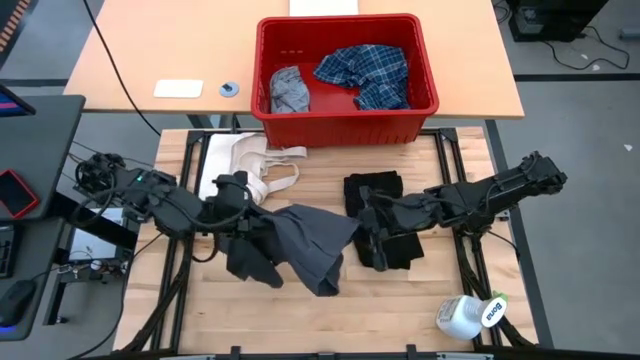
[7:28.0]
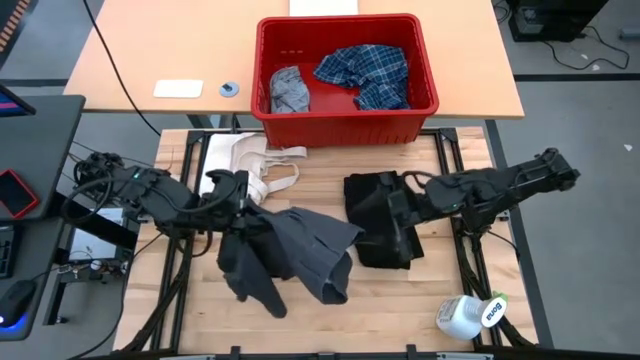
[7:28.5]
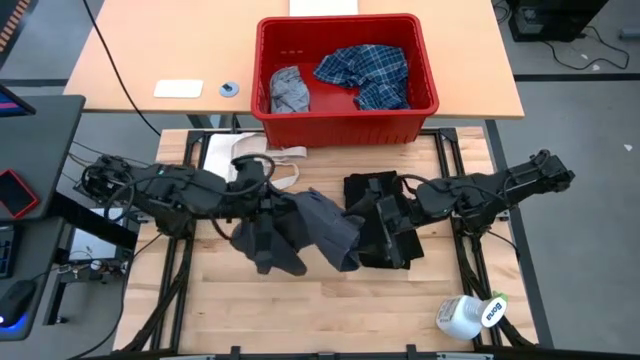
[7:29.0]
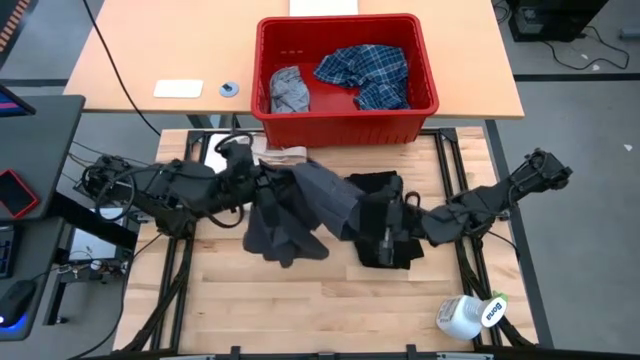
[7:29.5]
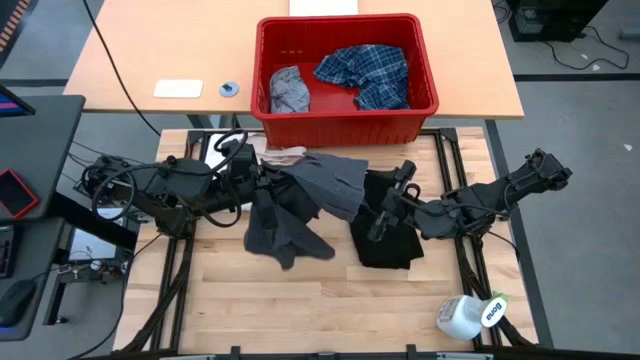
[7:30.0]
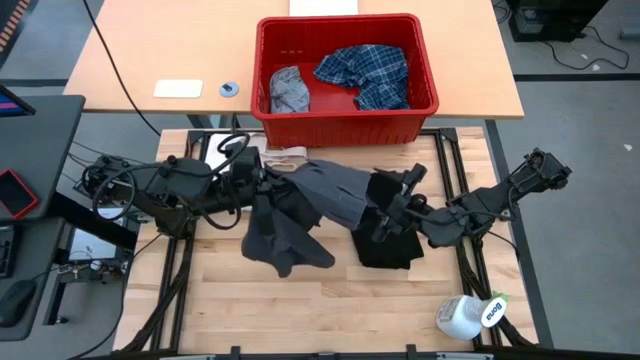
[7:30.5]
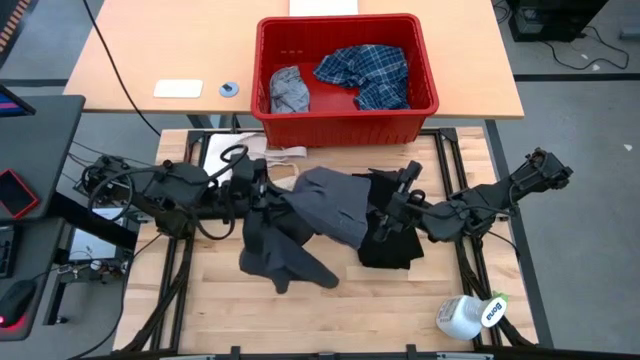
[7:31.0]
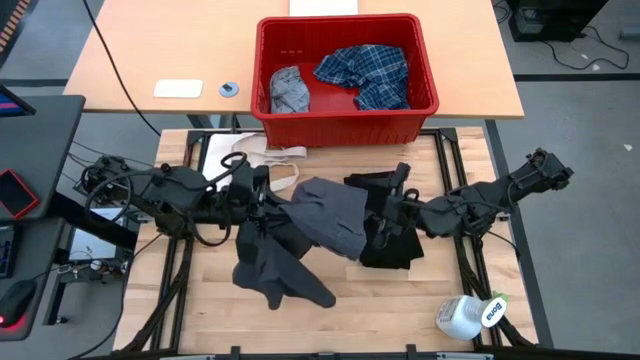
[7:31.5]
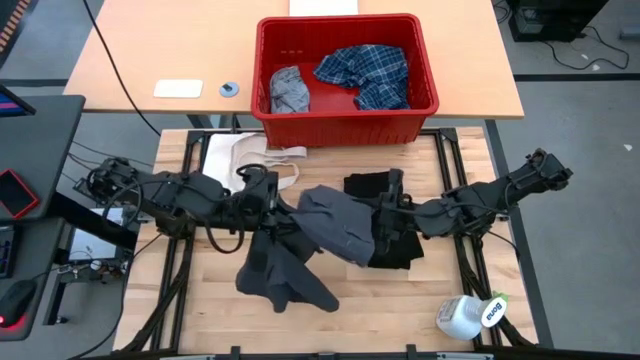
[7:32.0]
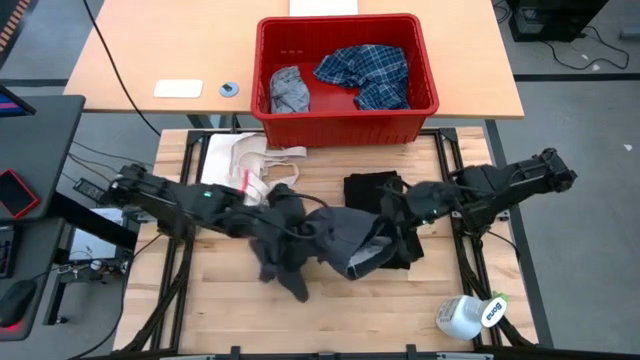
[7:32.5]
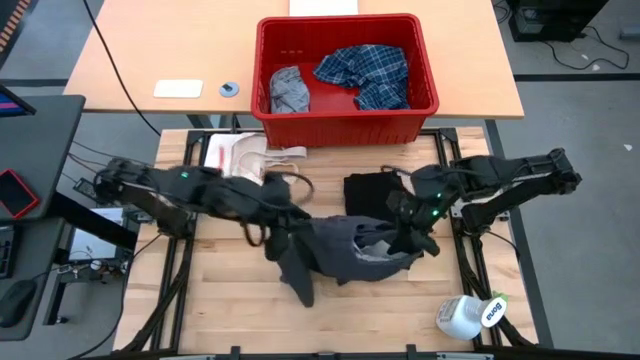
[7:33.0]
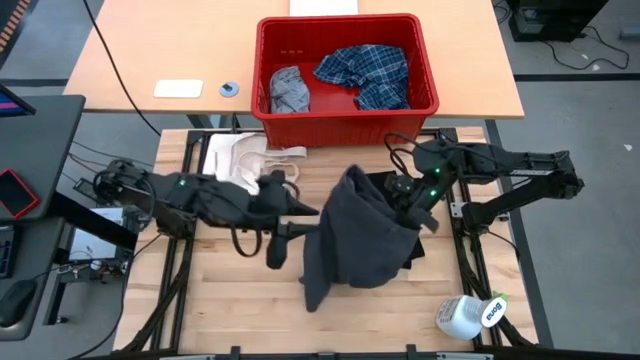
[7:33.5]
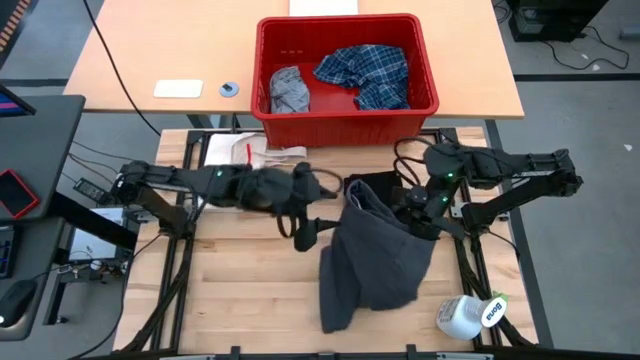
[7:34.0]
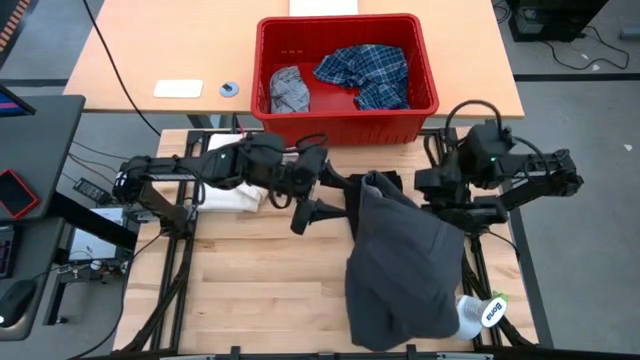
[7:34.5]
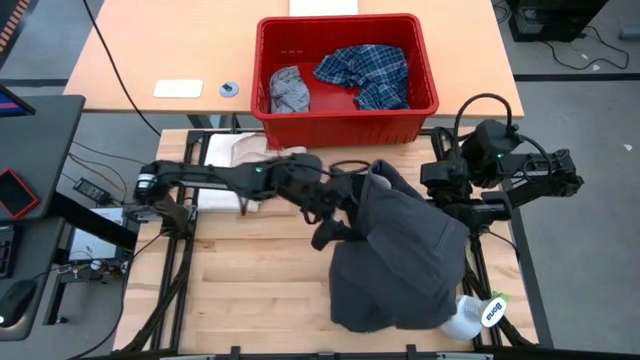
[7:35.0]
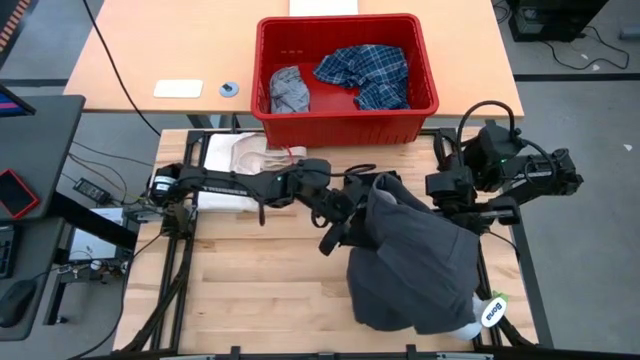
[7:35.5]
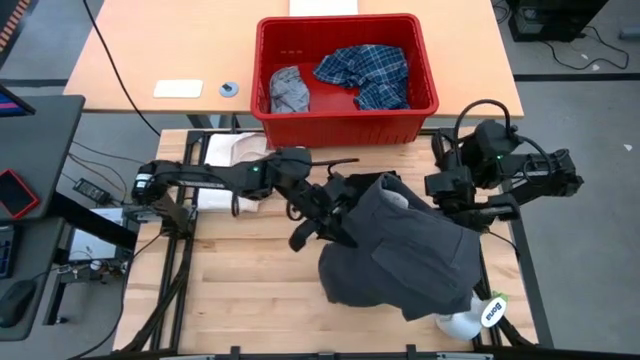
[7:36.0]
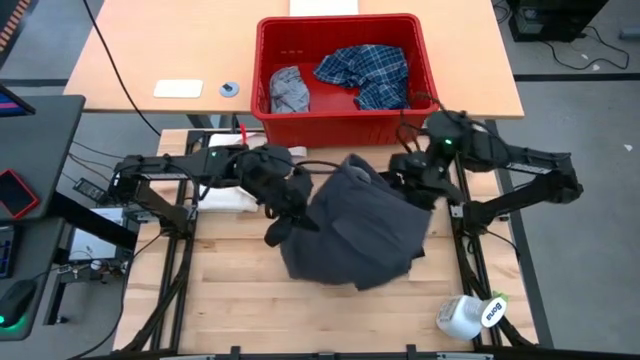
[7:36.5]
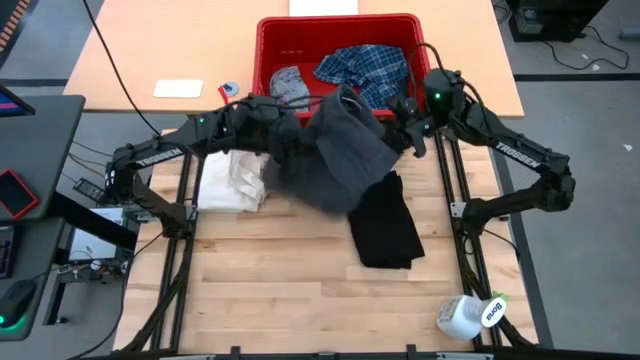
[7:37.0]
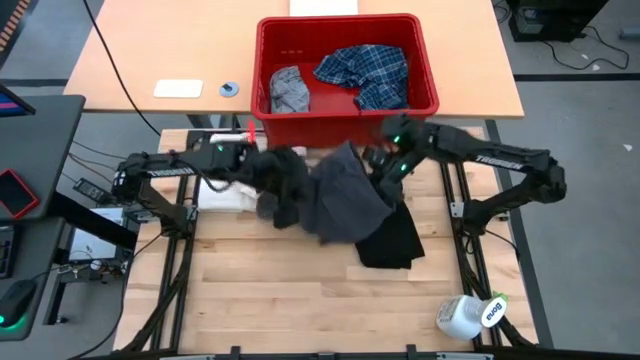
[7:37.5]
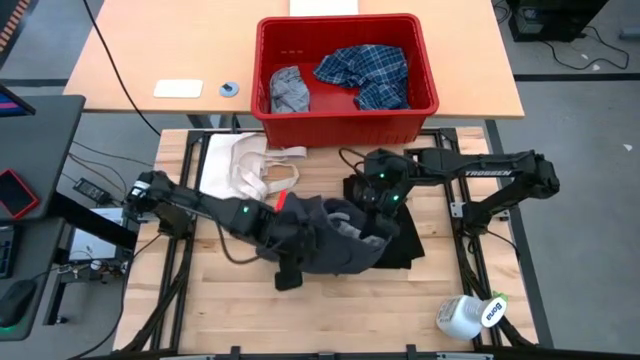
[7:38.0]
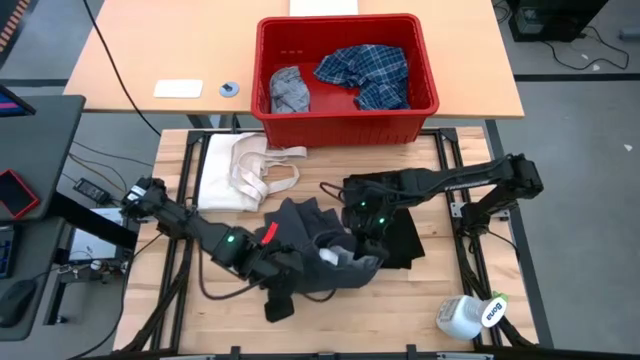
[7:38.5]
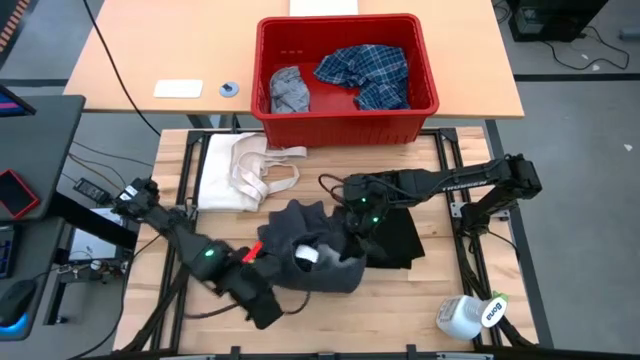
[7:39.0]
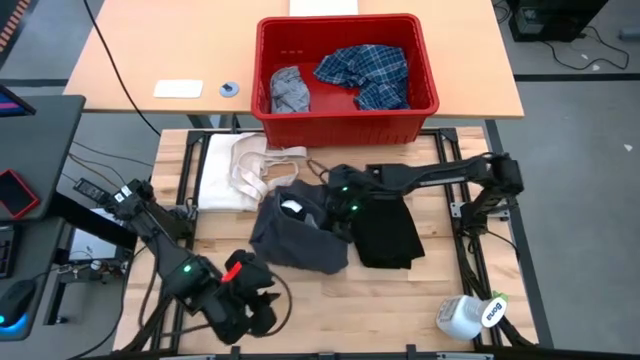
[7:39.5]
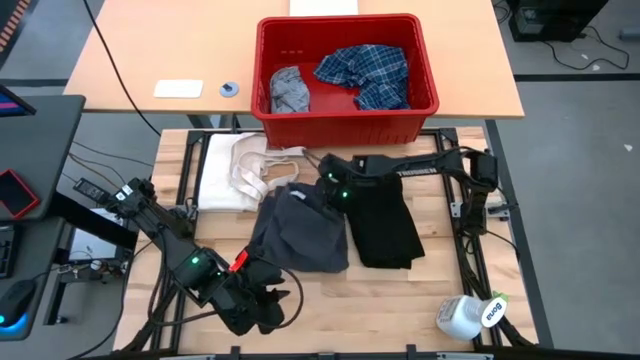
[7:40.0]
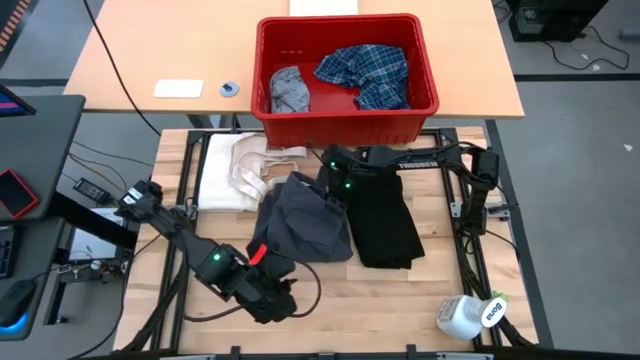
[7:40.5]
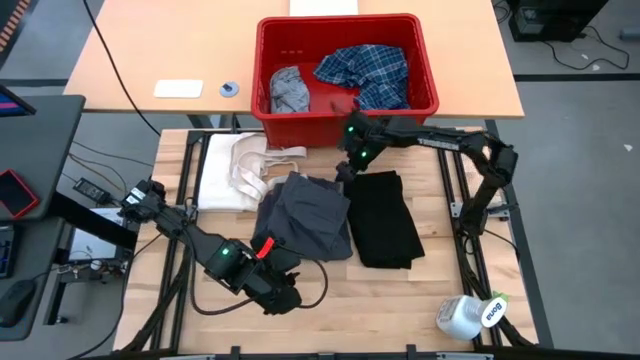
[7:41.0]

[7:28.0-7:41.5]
Task: Fold Laundry from Bin
Fold the gray pants

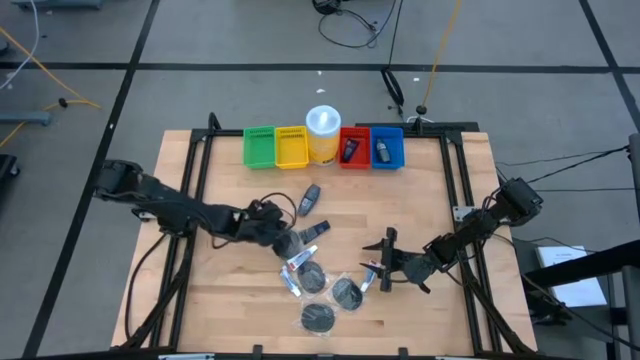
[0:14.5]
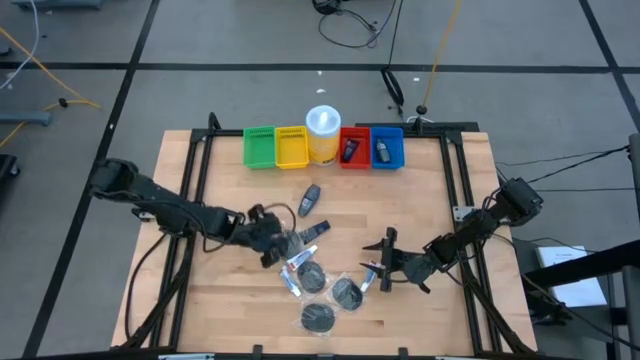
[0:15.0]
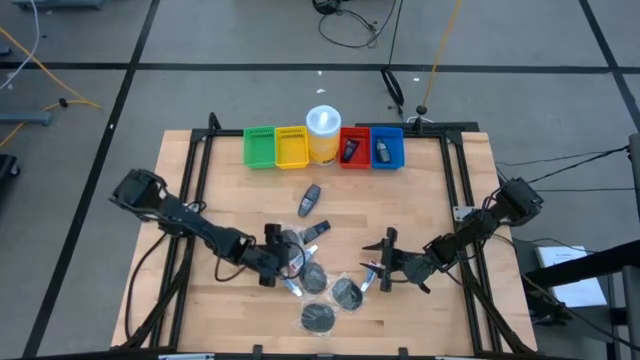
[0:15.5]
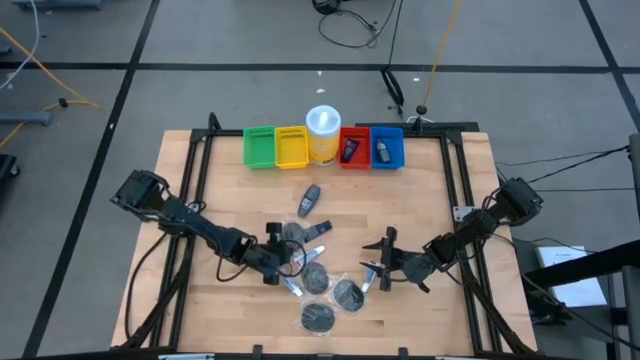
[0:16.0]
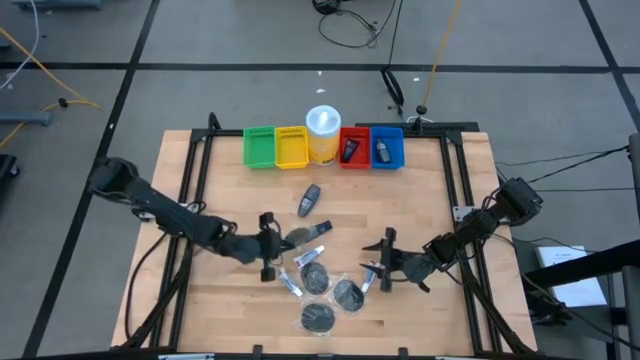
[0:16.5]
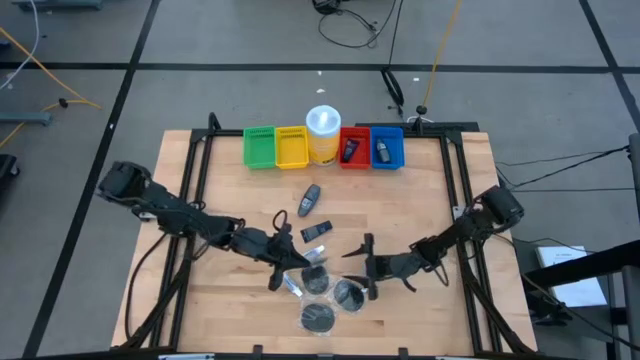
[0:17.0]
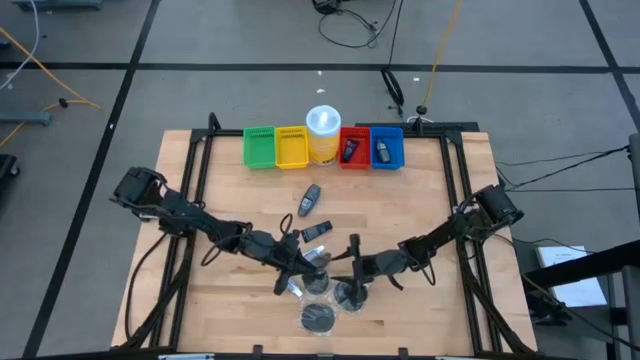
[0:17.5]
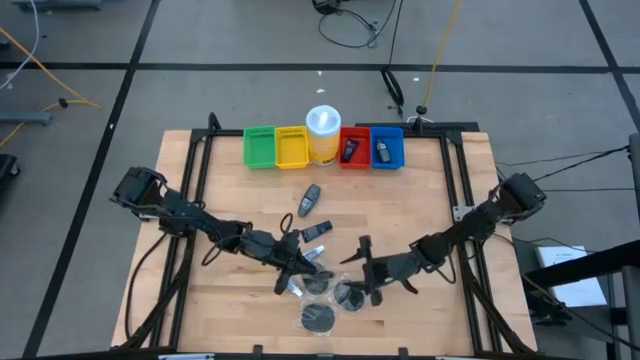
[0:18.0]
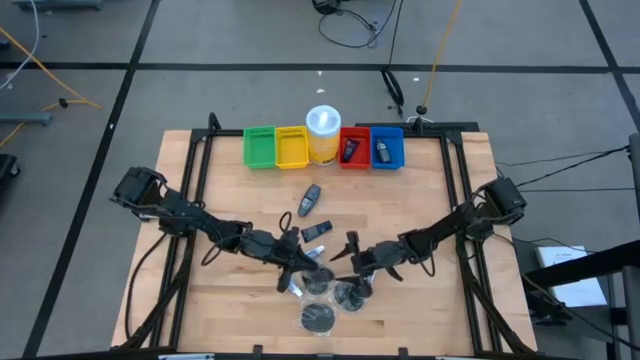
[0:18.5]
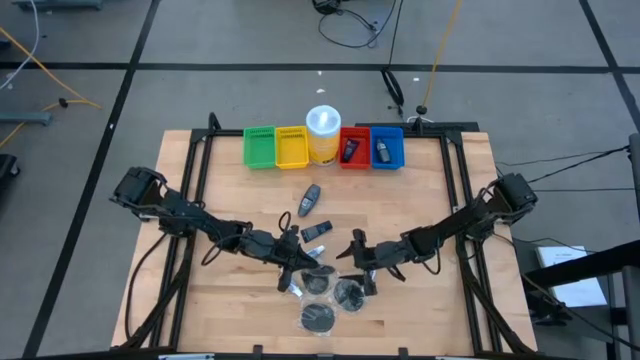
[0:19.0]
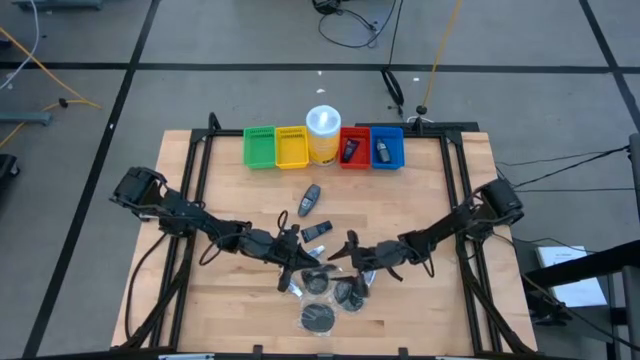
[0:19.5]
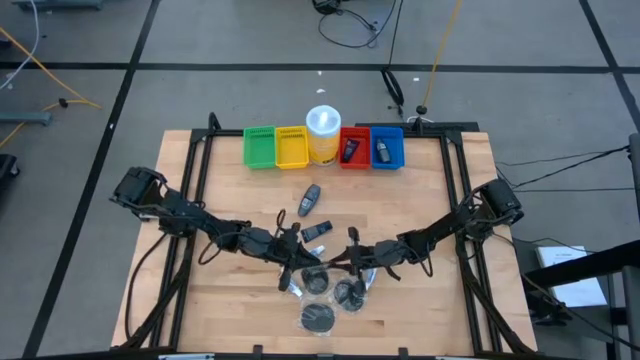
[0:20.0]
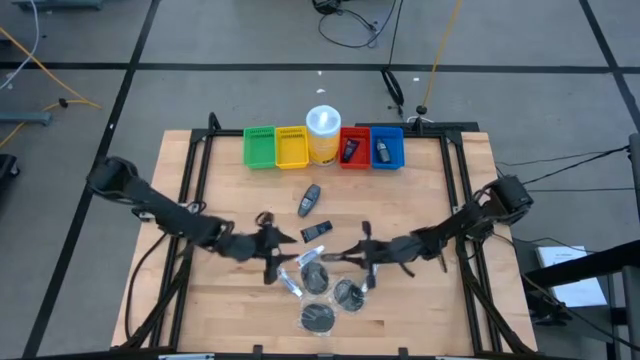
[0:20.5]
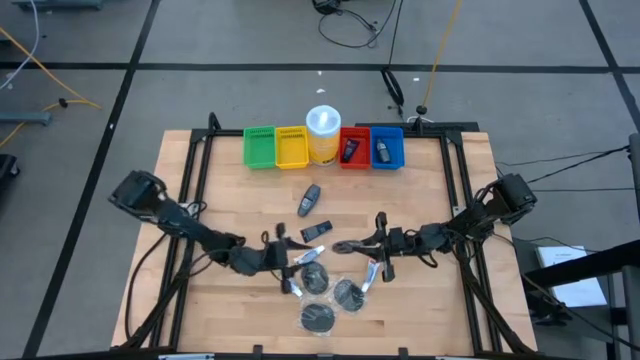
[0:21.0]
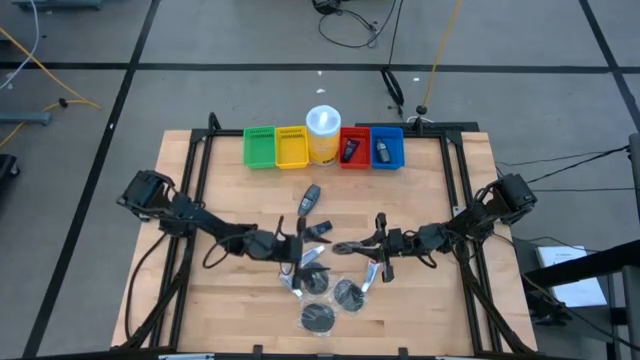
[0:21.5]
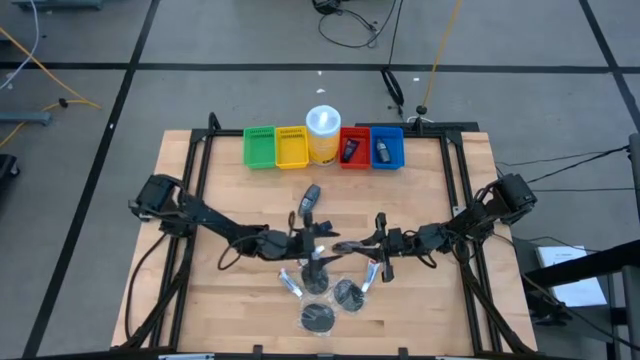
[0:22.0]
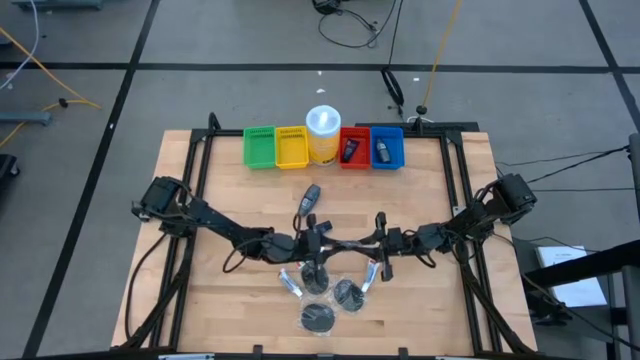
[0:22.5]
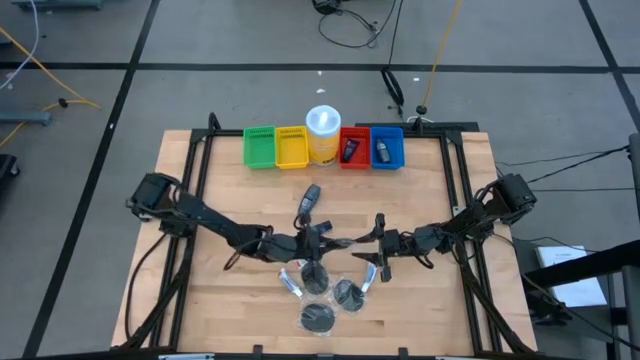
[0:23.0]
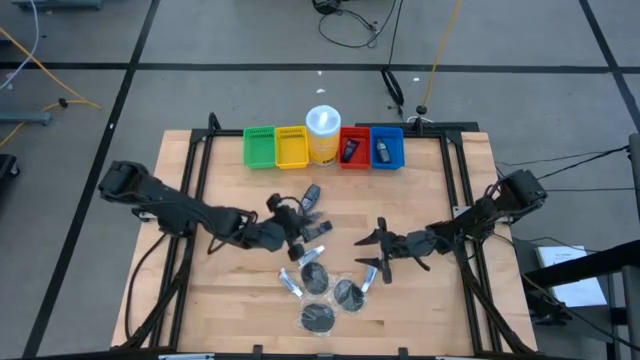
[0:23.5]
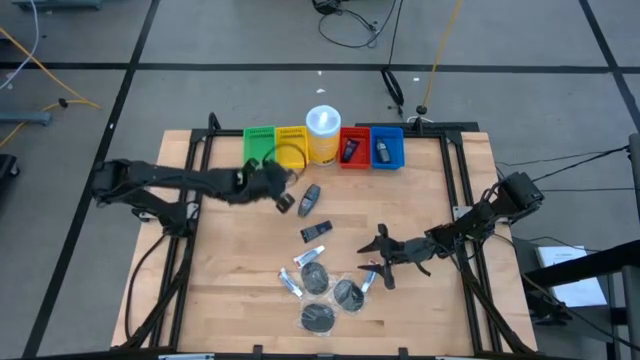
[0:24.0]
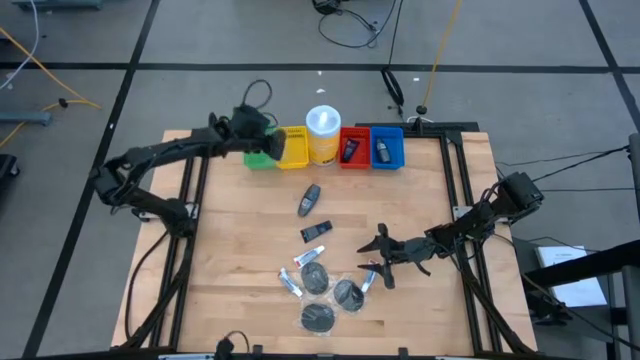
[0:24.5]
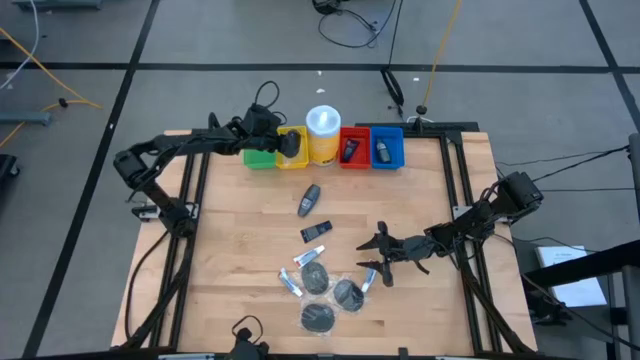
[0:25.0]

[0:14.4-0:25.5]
Task: Pick & Place Travel size toiletries
Put the black hairbrush into the yellow basket
